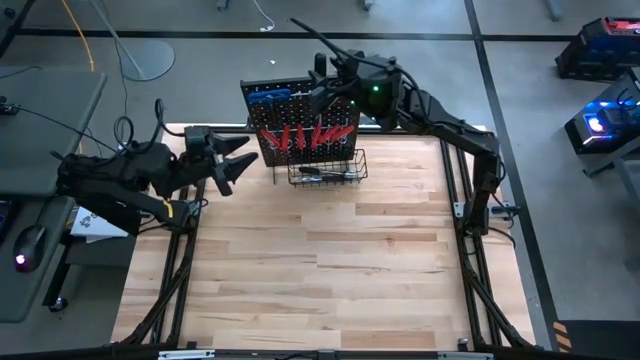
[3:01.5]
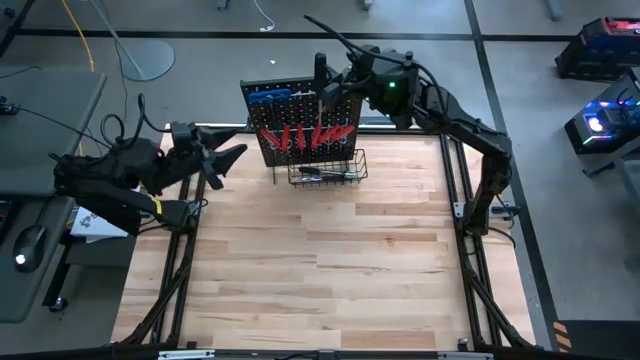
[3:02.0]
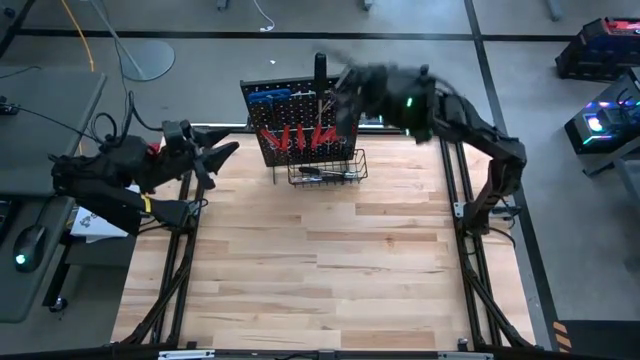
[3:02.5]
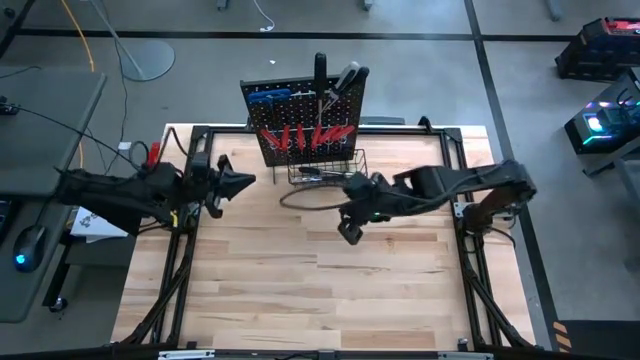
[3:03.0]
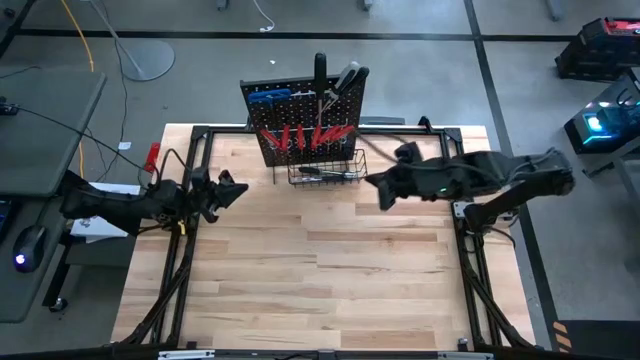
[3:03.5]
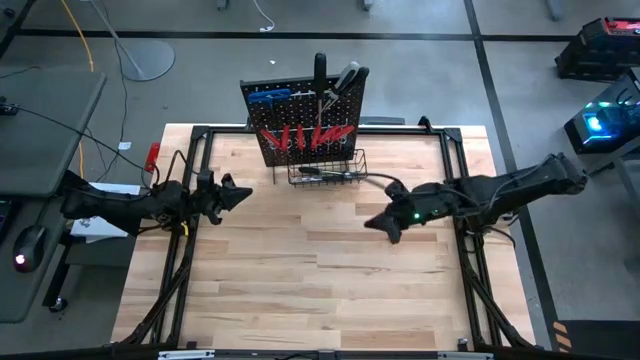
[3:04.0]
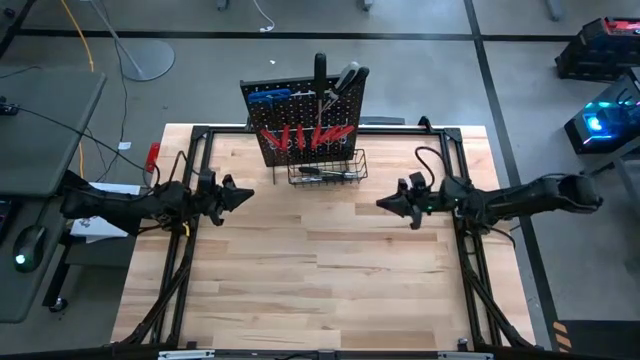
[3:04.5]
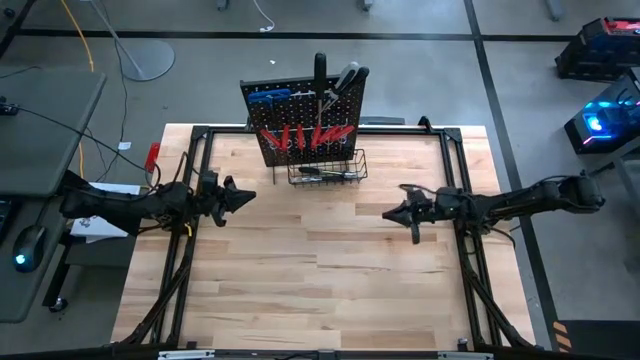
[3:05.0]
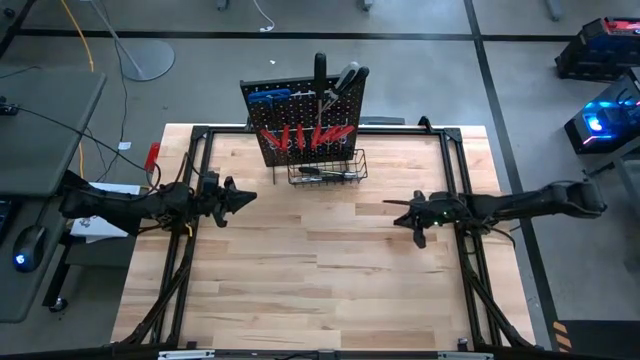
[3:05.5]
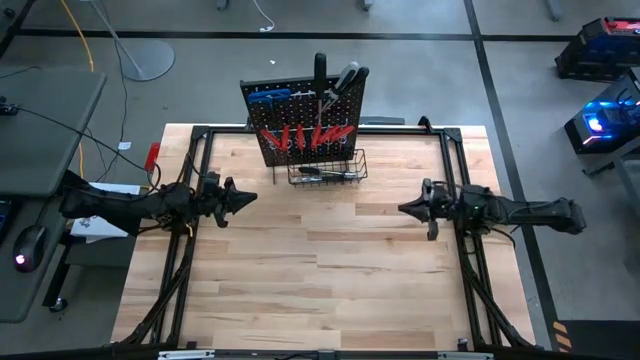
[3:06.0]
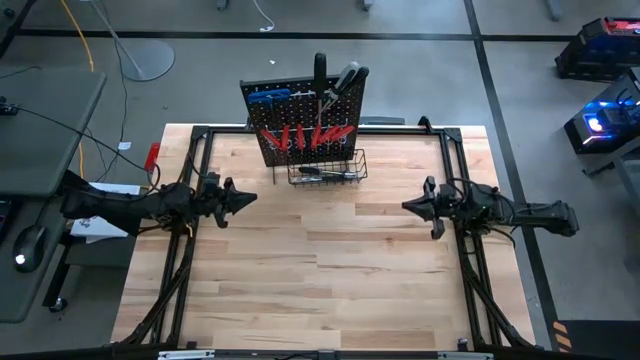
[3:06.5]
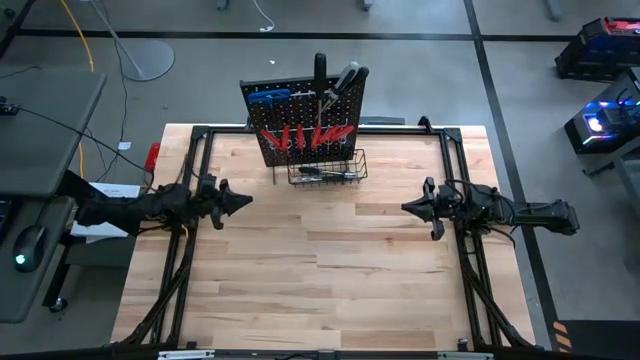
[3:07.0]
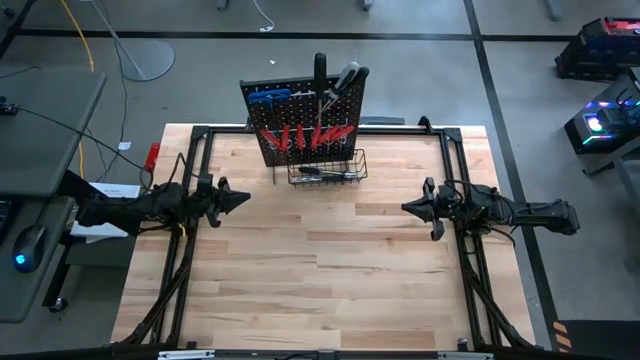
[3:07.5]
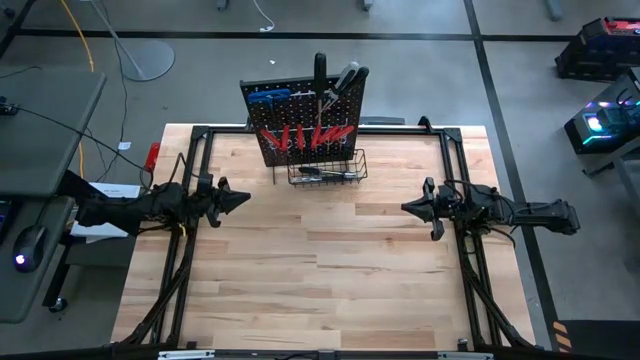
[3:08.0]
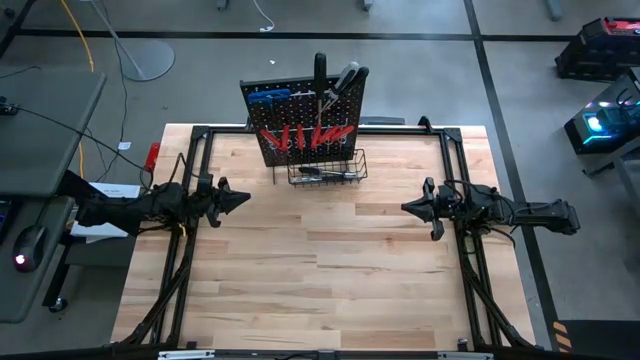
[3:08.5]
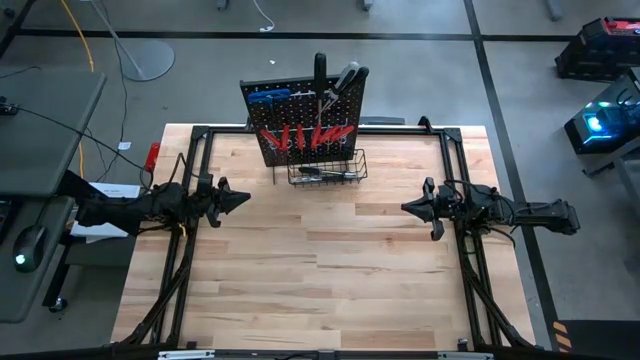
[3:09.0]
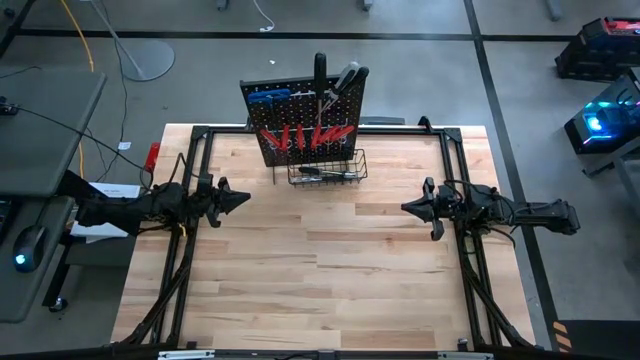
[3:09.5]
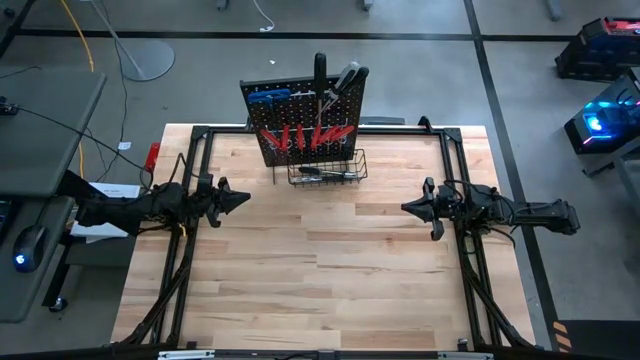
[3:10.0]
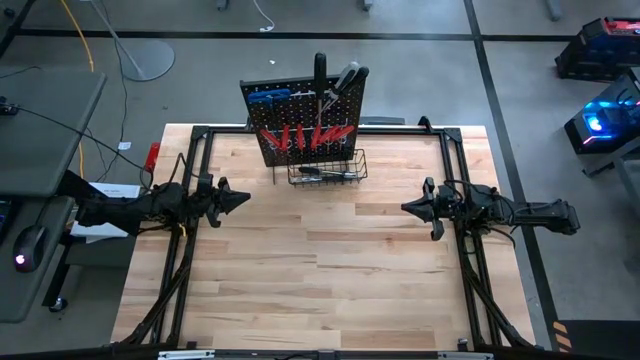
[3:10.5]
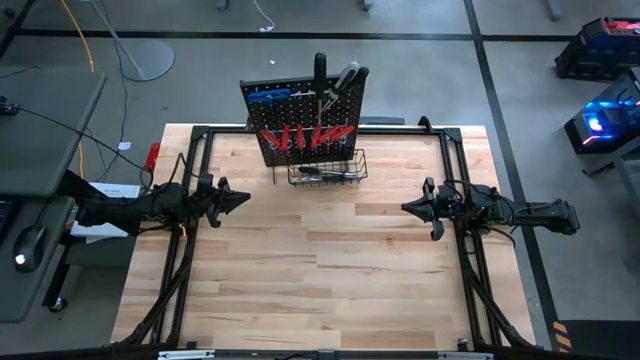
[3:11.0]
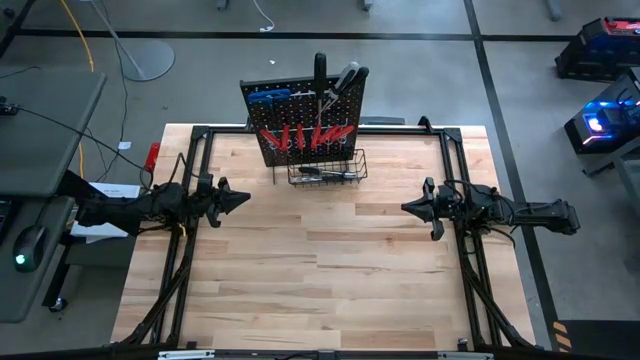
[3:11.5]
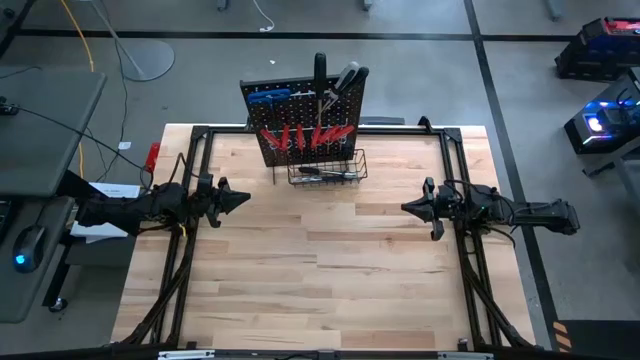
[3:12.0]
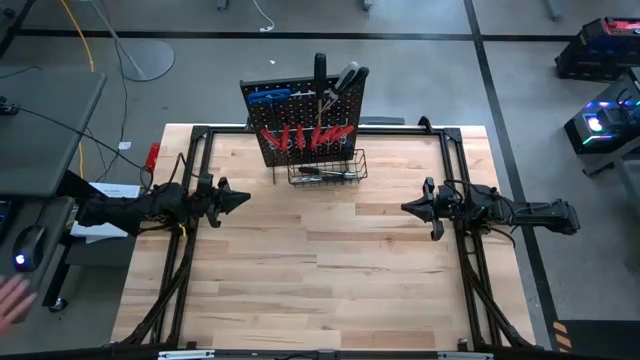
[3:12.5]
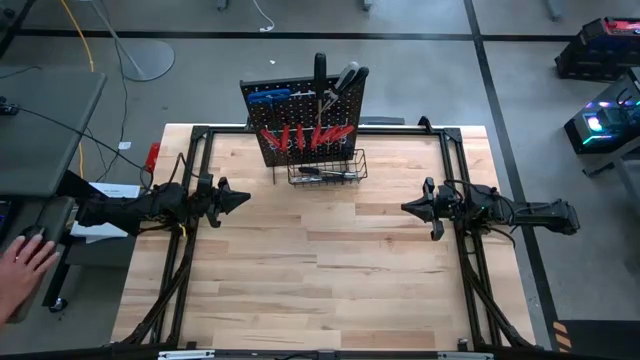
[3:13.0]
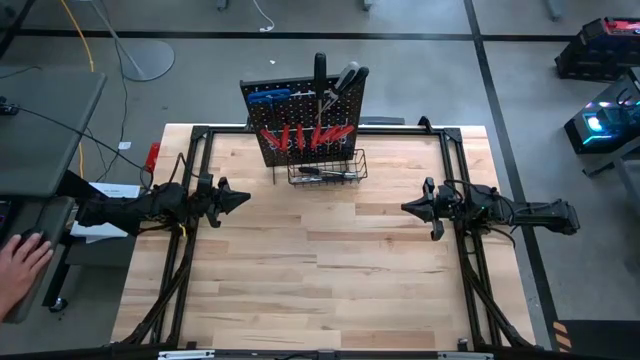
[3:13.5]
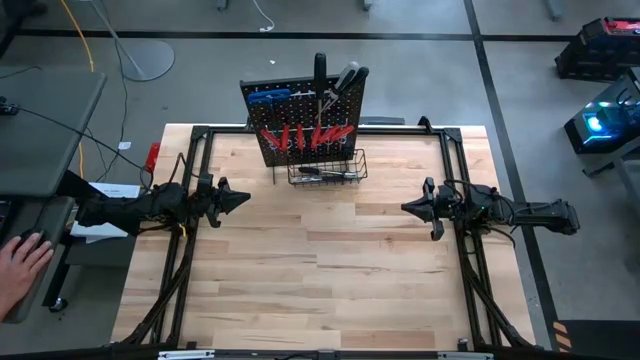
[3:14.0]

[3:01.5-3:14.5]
Task: Hang tools onto peg board
Return to Home Position

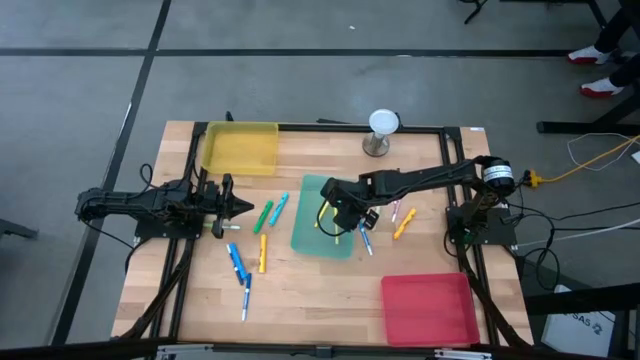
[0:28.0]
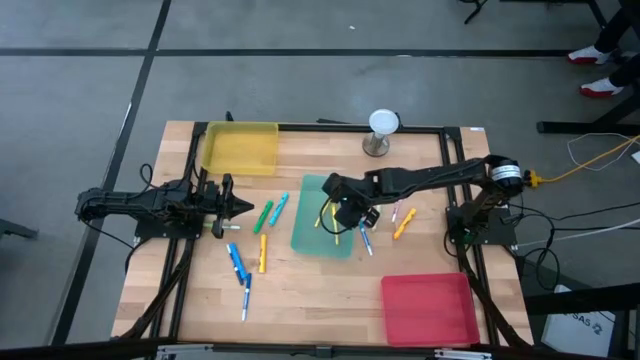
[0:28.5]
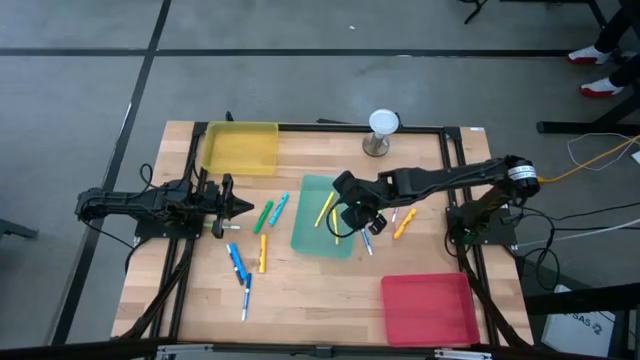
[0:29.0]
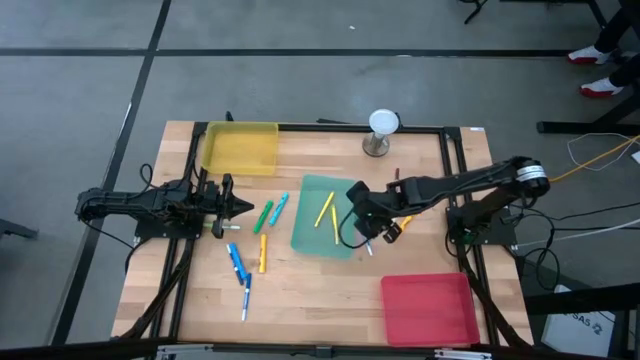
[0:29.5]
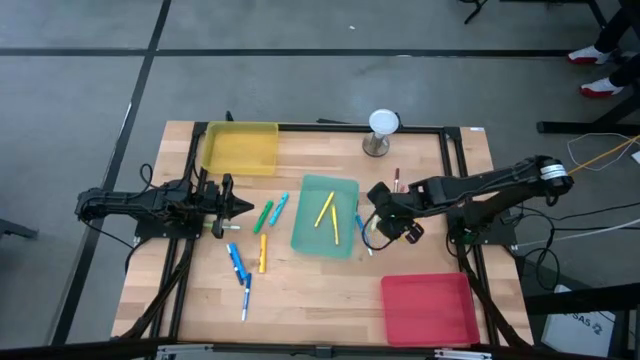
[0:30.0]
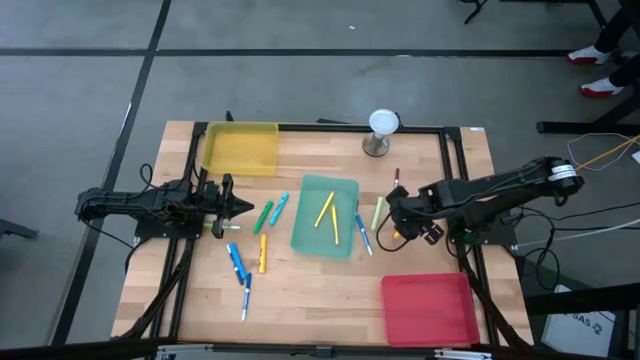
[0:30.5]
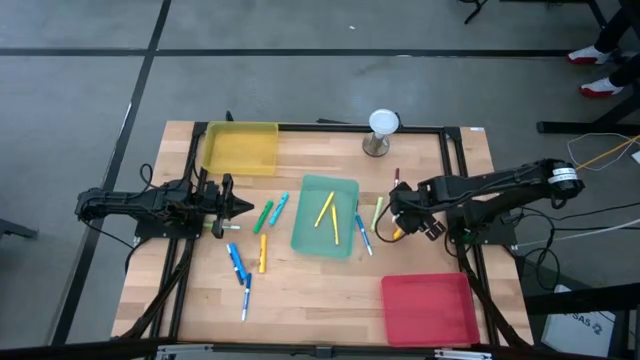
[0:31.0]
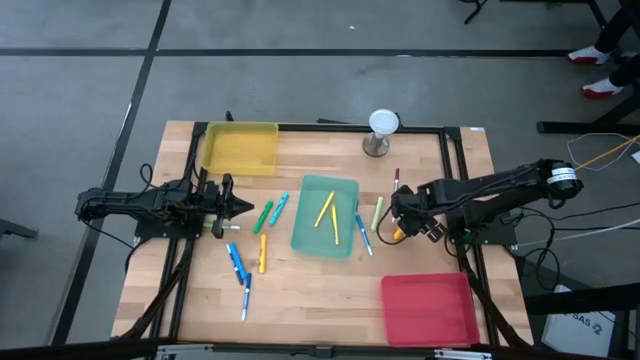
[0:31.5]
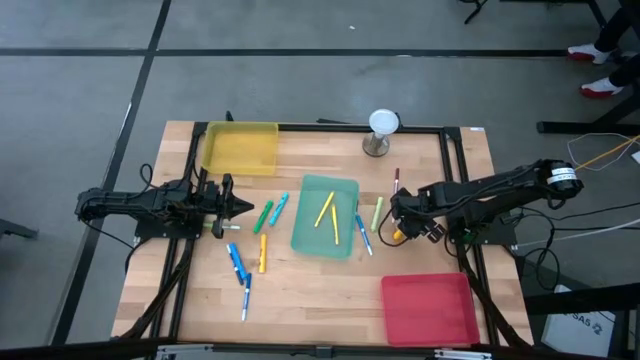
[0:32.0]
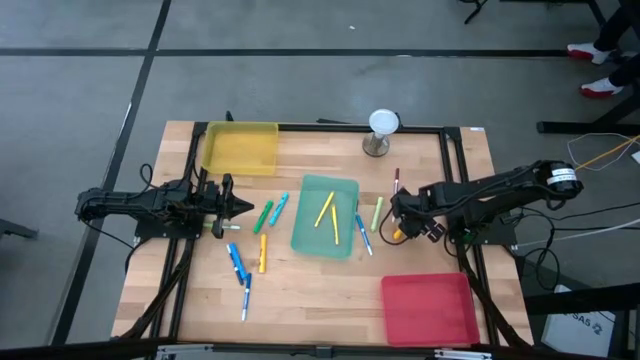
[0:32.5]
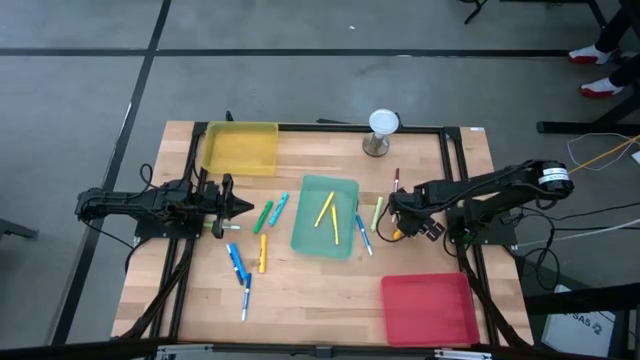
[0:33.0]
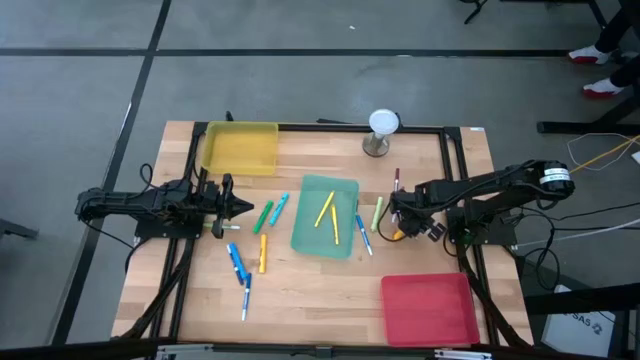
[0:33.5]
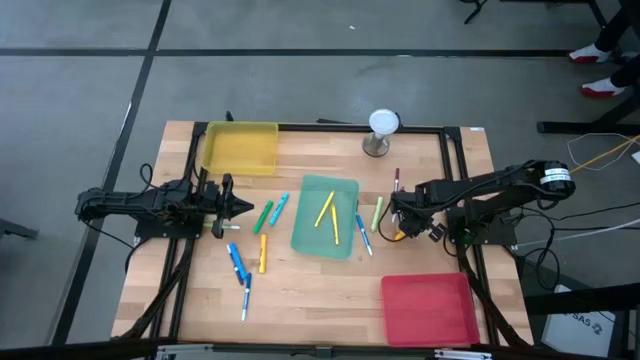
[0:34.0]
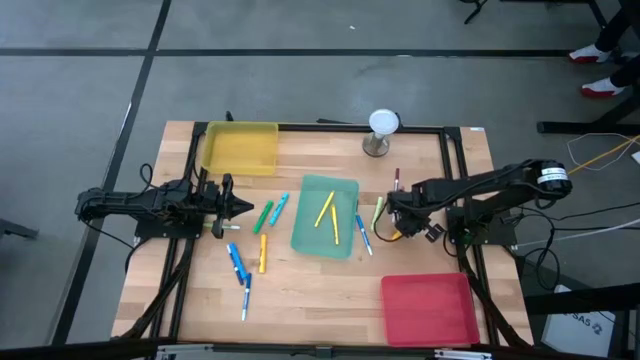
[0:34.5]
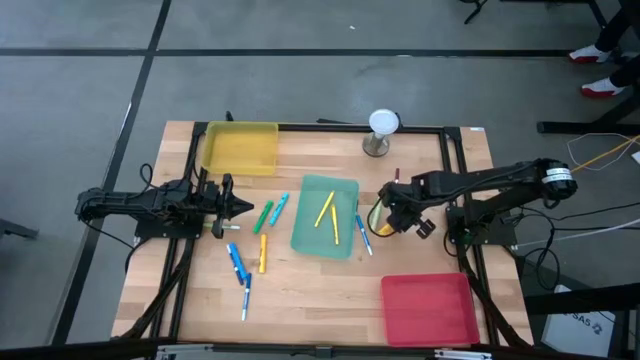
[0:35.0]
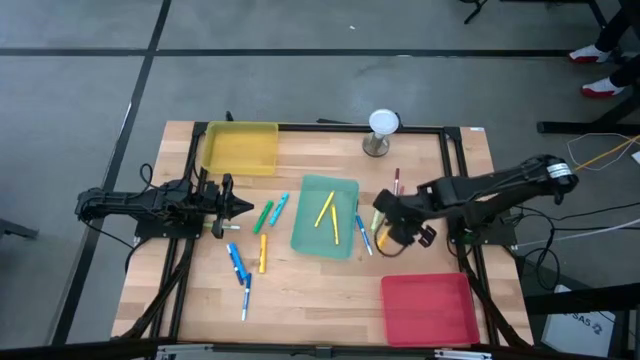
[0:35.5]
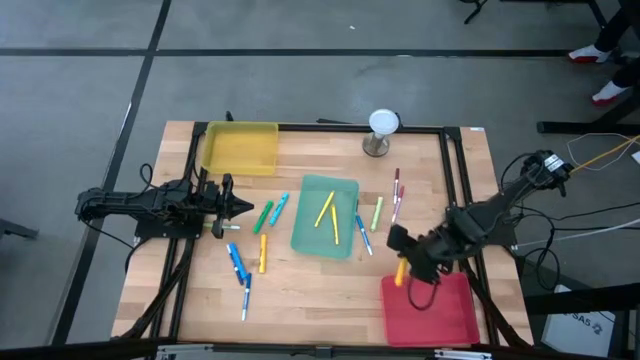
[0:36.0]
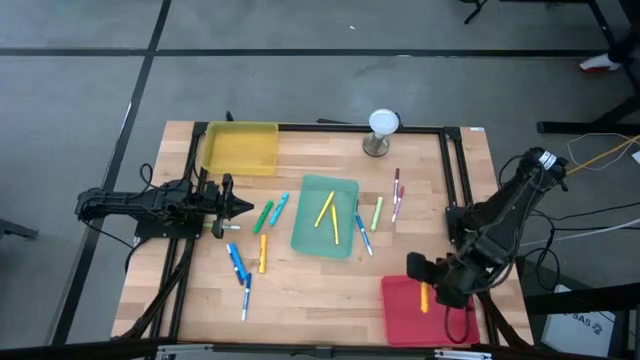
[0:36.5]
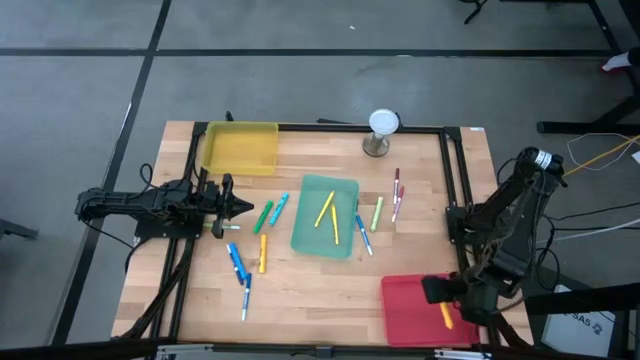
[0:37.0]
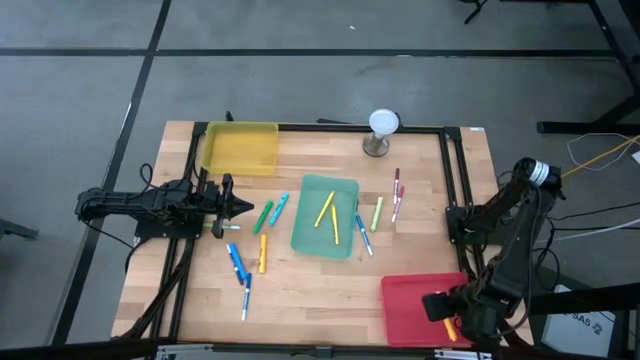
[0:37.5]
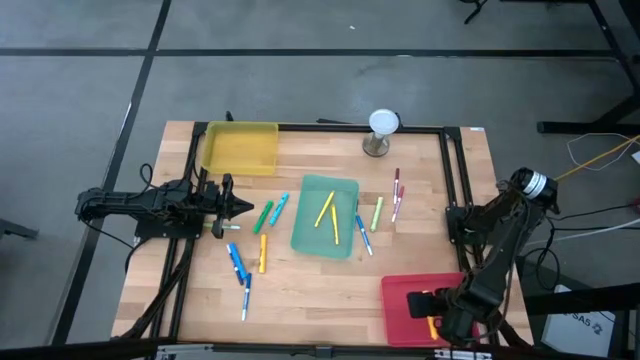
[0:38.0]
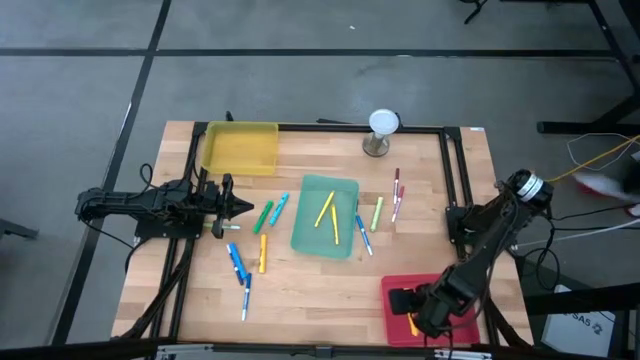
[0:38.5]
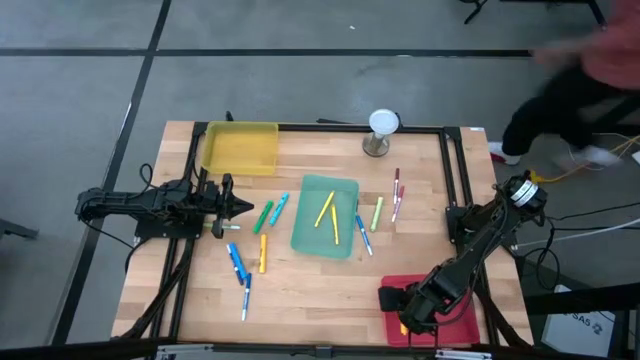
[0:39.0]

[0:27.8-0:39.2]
Task: Pick & Place Markers
Put the right yellow highlighter pen into the pink bin
